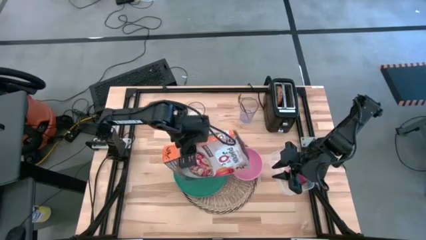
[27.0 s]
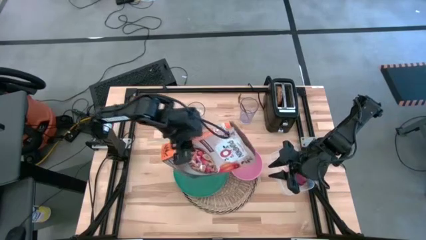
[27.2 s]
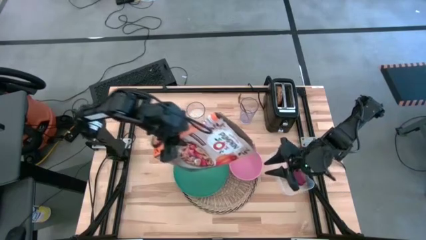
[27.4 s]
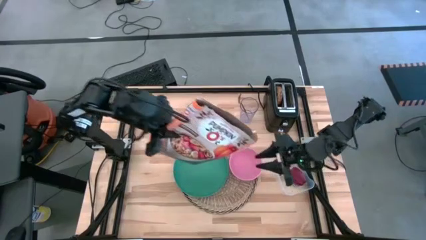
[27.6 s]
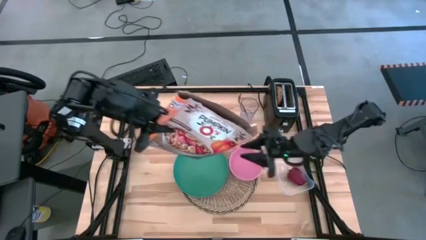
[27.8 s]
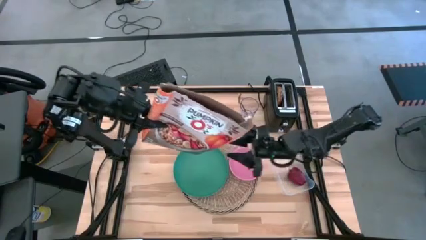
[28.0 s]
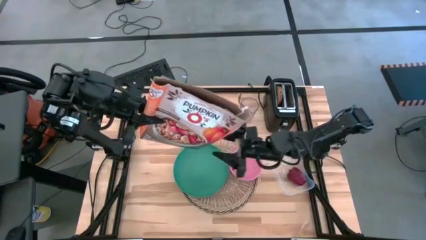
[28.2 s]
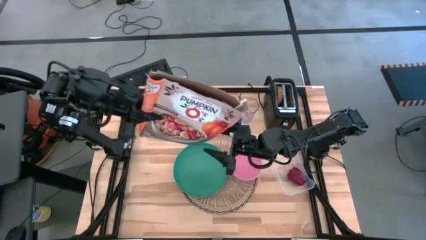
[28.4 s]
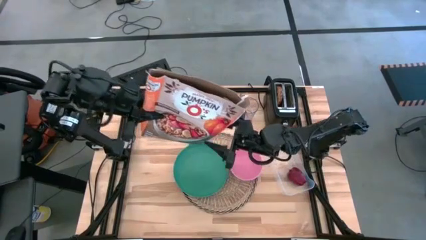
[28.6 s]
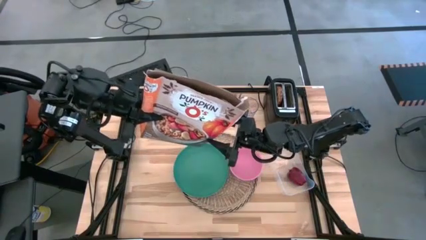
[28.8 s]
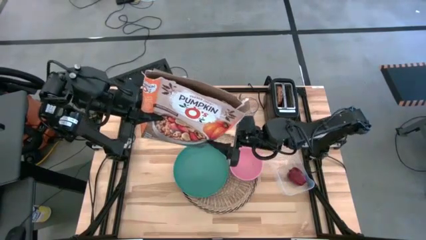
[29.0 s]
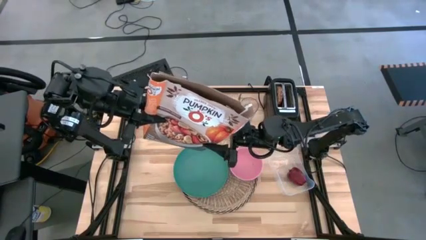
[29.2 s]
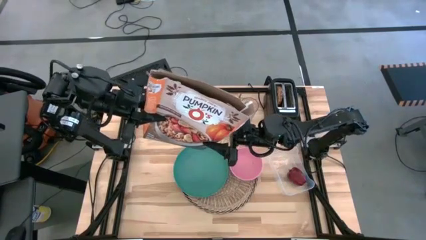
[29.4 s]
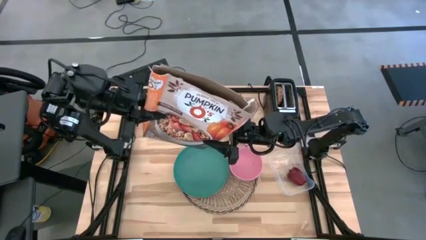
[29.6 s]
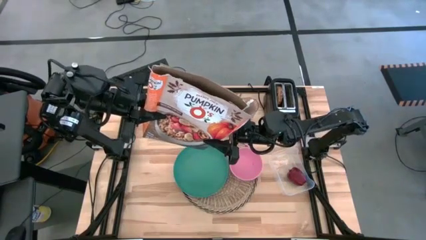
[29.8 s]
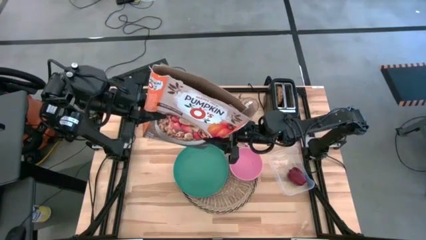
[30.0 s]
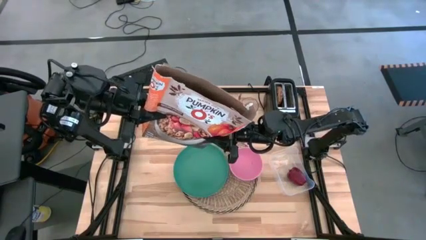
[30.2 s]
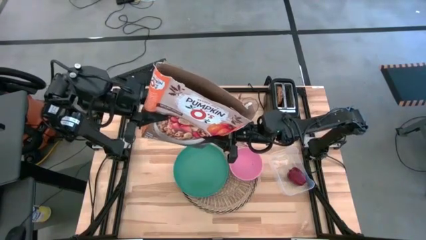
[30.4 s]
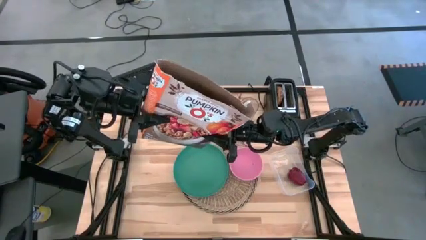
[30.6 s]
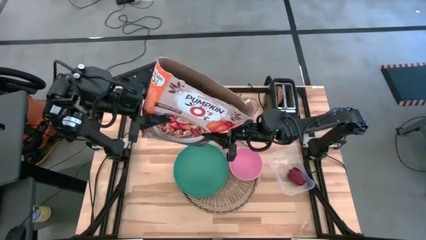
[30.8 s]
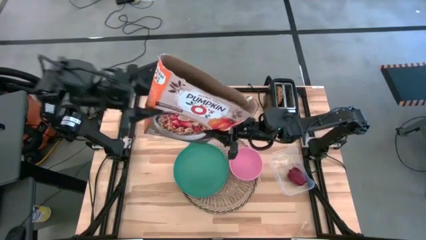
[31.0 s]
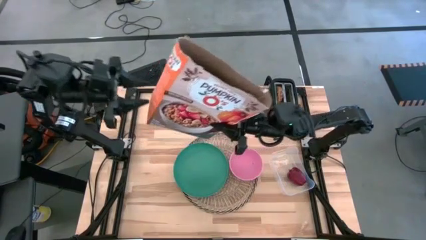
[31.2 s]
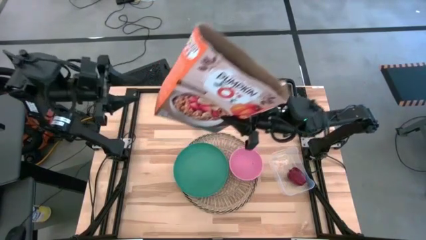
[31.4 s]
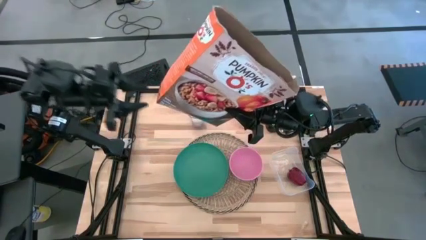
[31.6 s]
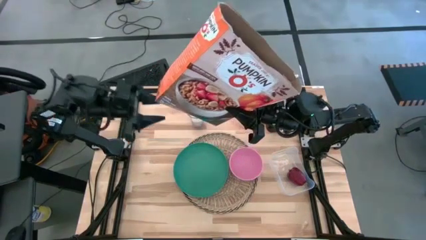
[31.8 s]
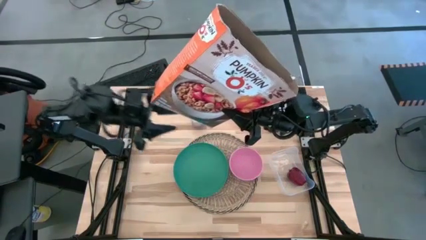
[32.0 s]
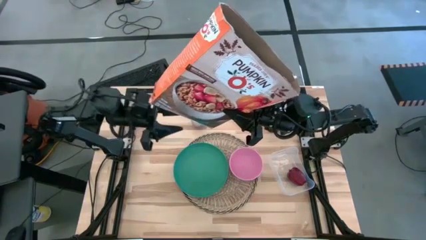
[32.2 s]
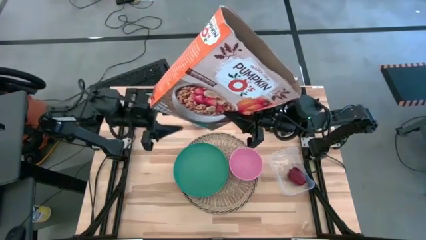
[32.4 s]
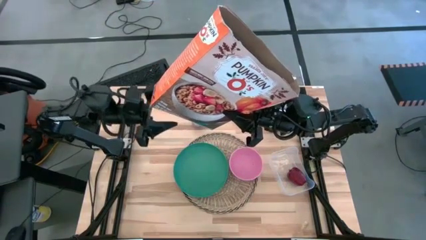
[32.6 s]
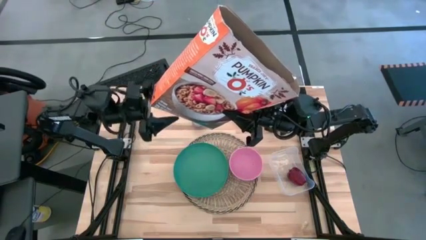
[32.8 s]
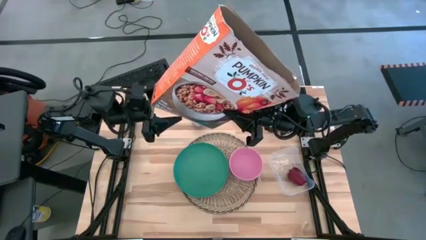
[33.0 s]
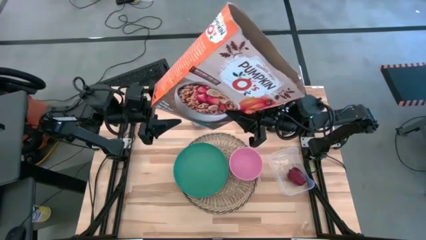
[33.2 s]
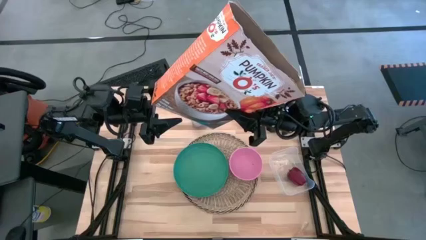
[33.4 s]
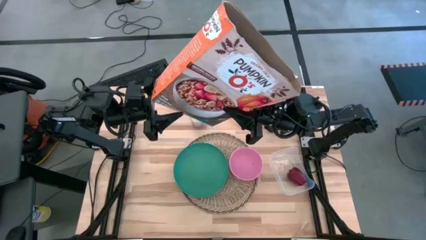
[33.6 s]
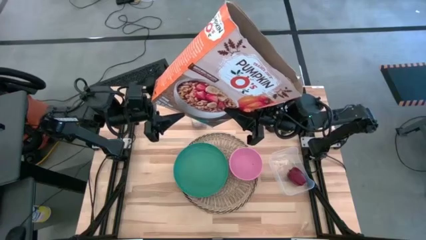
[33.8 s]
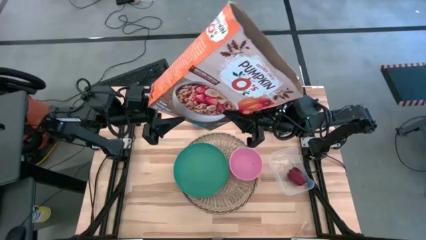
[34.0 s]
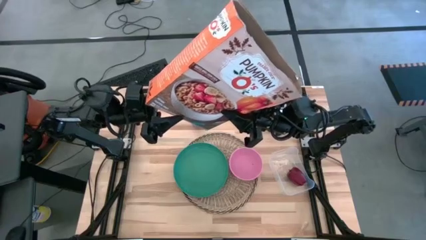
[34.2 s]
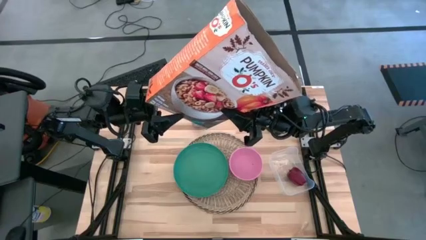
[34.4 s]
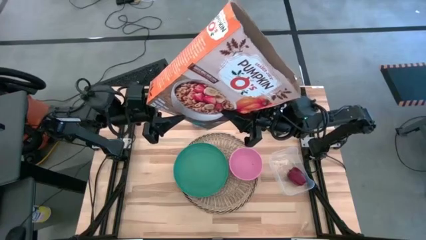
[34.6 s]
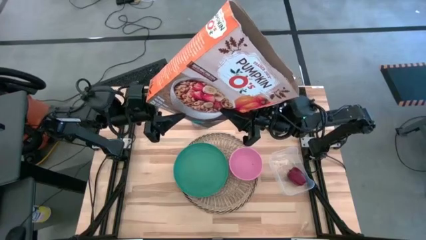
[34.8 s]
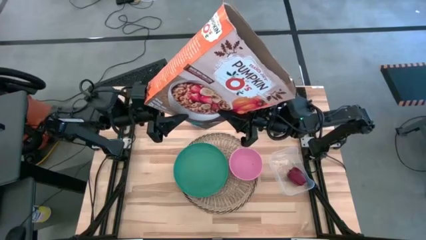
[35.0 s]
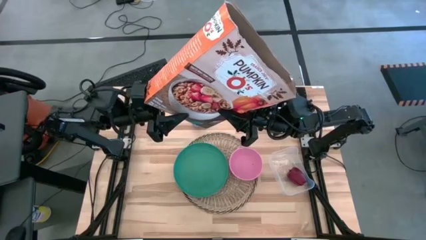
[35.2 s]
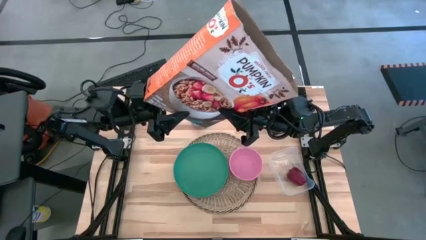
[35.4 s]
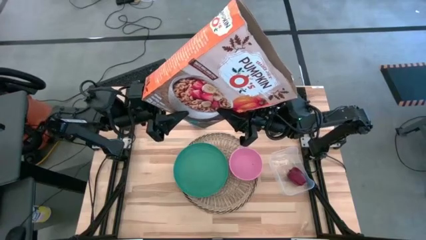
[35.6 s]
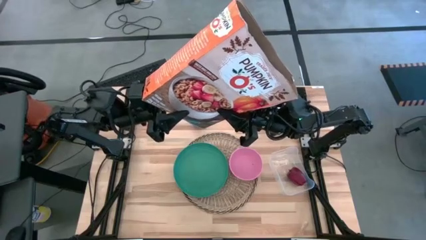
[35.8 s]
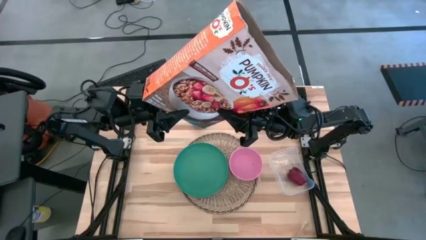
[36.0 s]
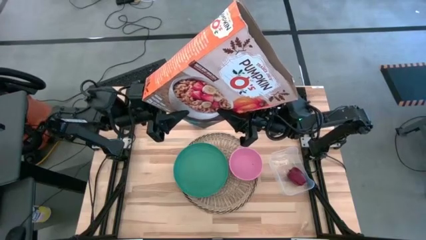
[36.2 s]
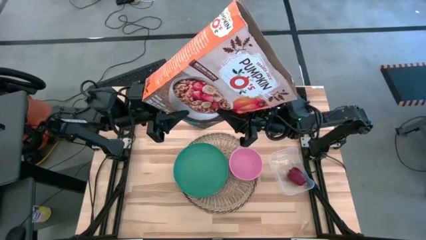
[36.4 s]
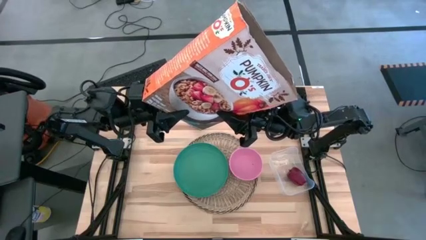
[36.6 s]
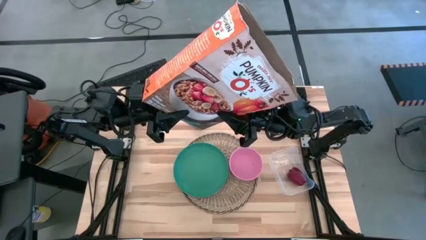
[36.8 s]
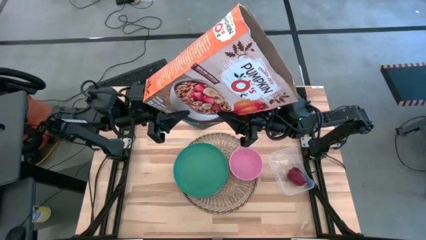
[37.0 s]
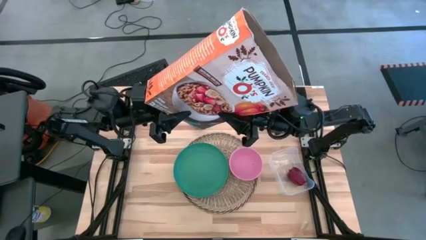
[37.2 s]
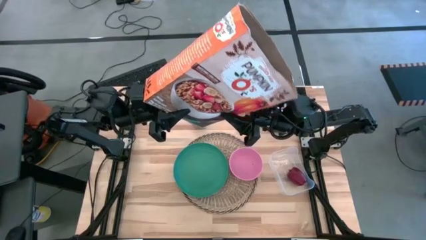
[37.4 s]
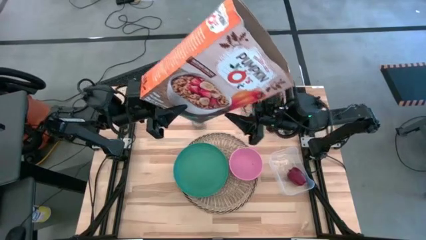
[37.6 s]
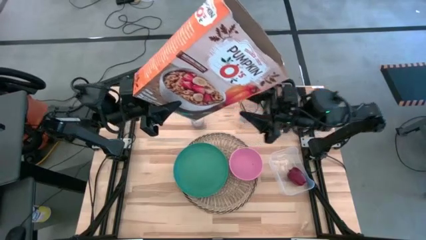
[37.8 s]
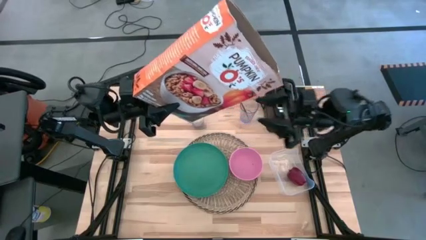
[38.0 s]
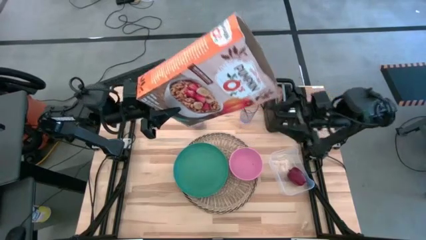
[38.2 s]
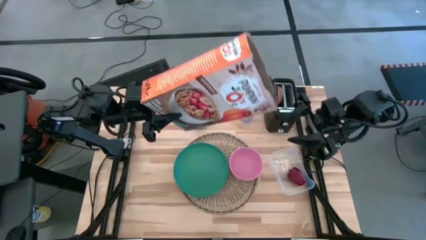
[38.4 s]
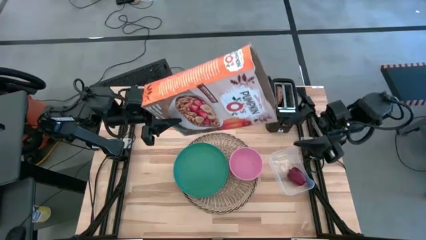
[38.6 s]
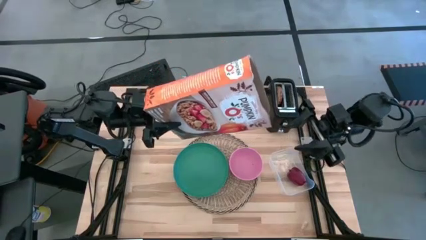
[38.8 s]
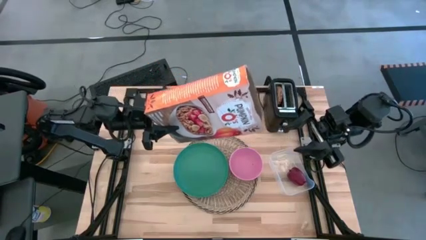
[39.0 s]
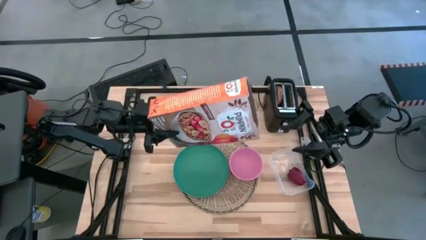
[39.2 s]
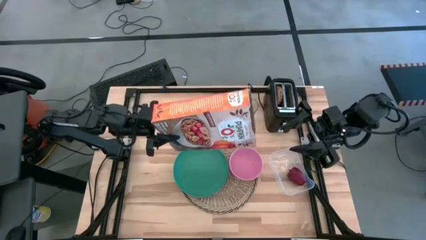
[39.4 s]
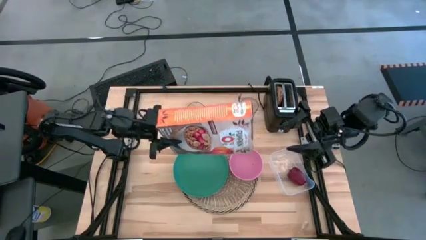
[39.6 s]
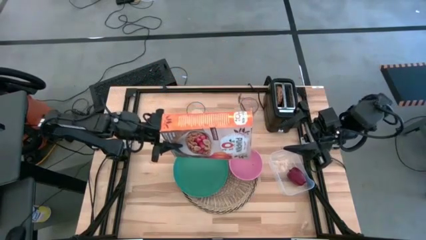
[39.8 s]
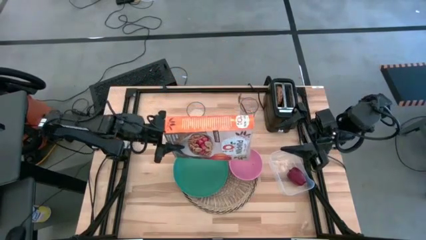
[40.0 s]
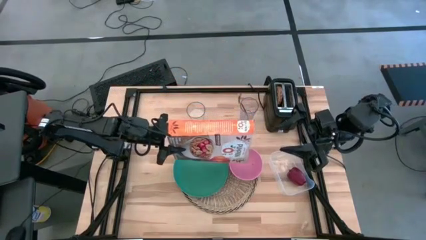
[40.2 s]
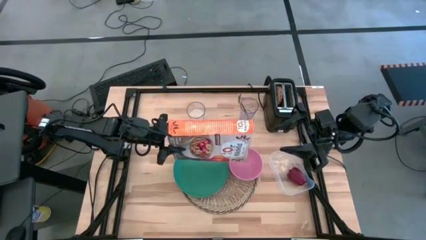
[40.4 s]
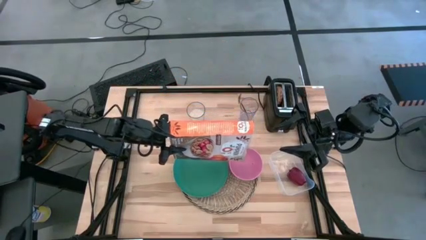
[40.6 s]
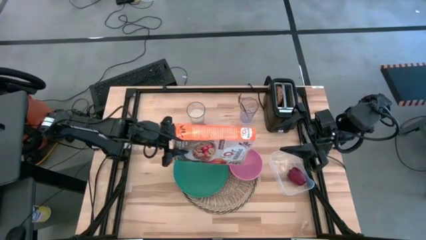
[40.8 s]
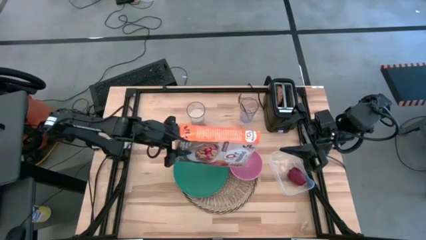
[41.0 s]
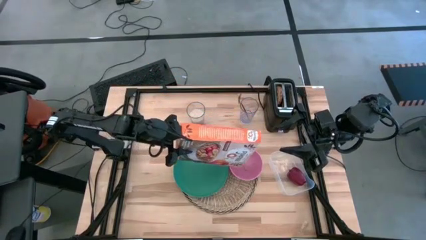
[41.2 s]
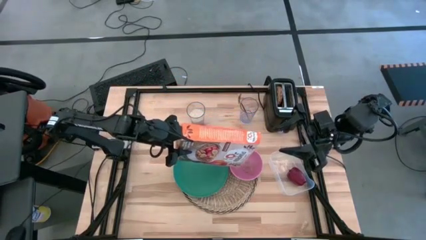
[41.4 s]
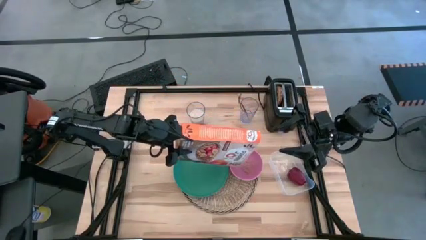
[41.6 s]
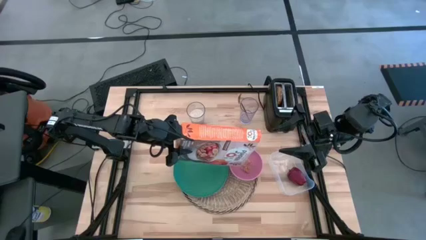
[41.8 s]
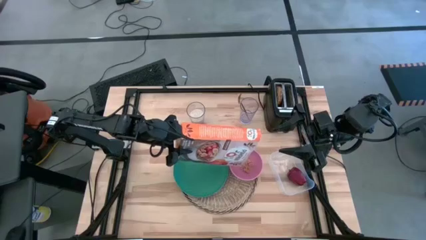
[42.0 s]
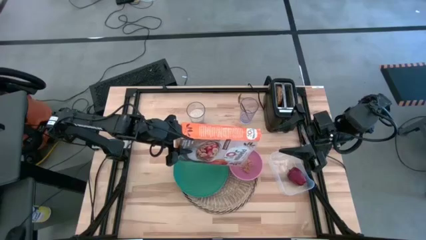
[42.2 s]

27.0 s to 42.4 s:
Task: Arrange a breakfast setting
Pour the cereals from the box into the pink bowl

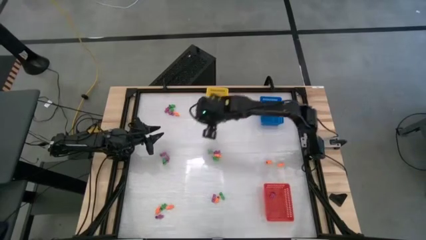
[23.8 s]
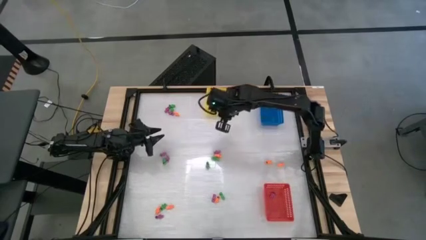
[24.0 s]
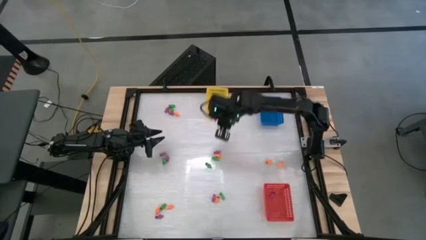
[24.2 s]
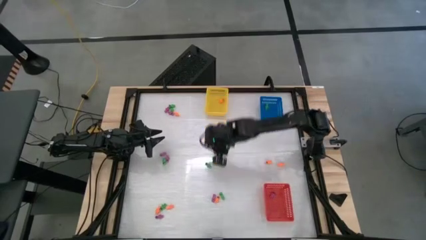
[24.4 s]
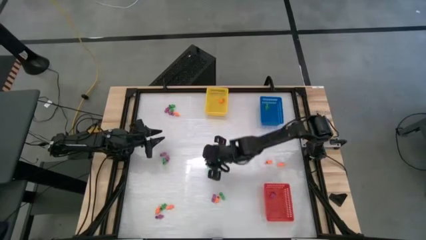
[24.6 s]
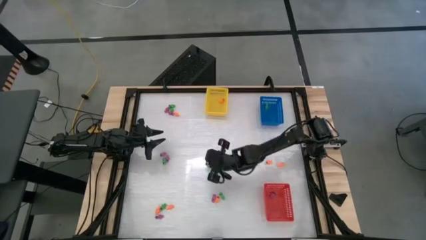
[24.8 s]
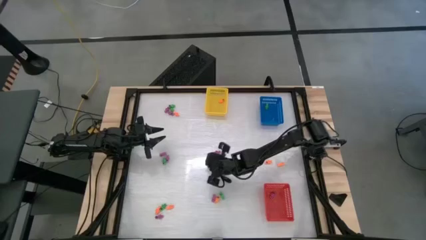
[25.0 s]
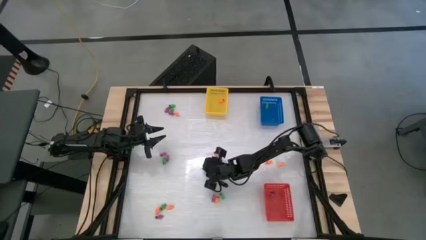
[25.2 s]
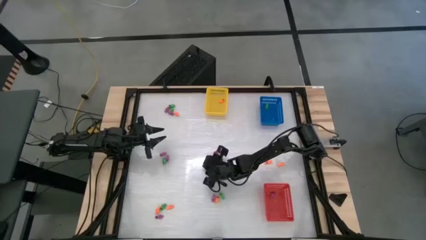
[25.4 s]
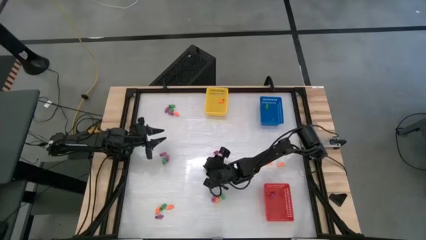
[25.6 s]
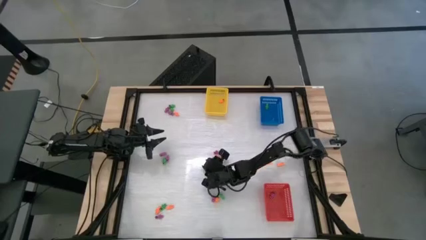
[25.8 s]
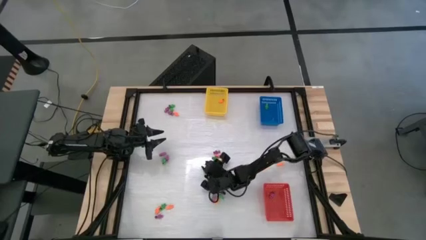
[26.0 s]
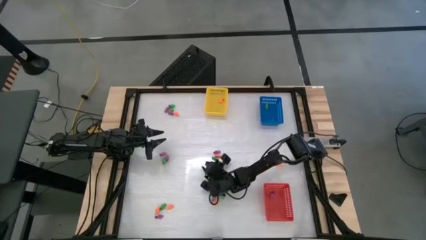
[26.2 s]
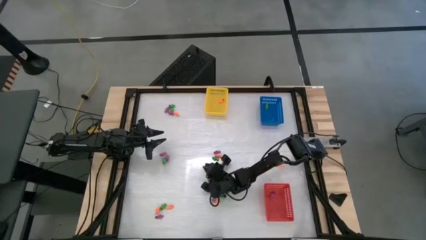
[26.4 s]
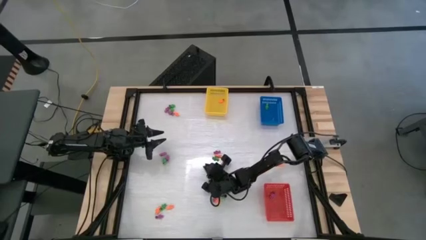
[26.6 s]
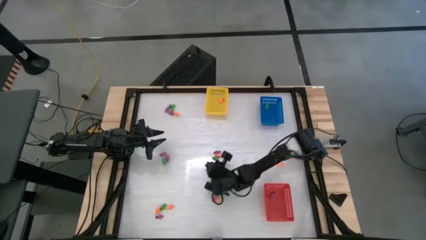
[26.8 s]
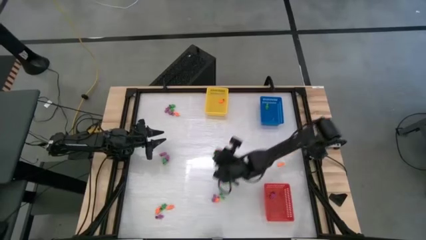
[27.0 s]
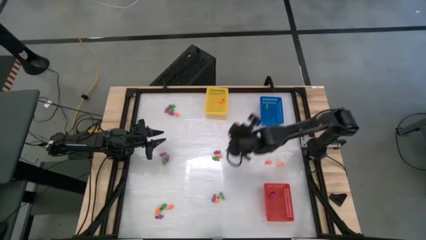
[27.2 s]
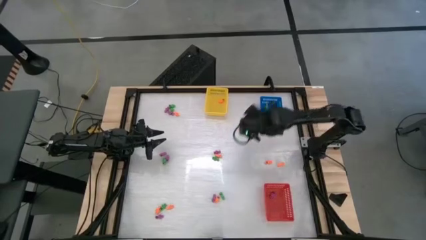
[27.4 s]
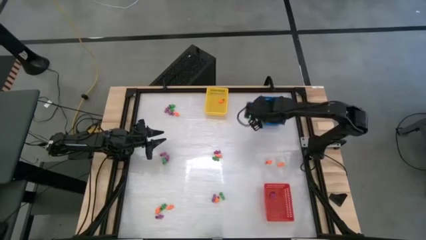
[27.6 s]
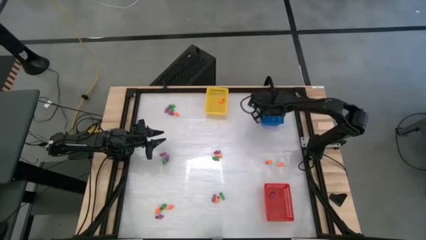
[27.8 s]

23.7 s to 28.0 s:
Task: Sort Halloween decoration
Put the green skeleton toy into the blue bin
